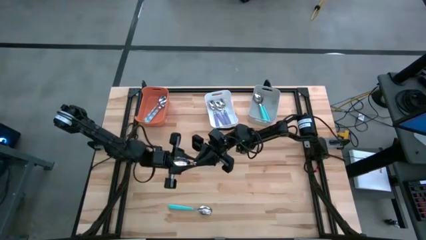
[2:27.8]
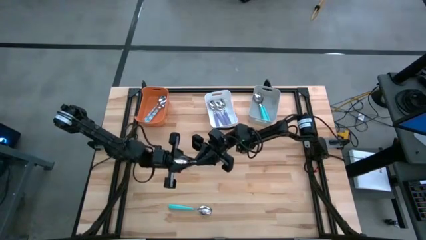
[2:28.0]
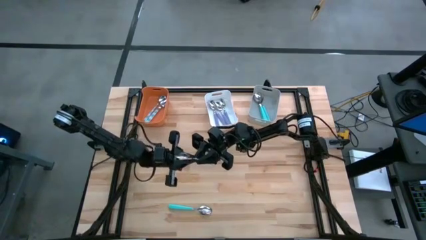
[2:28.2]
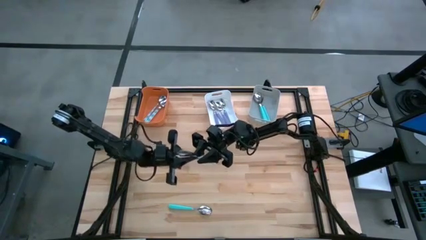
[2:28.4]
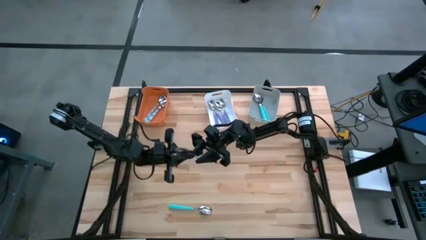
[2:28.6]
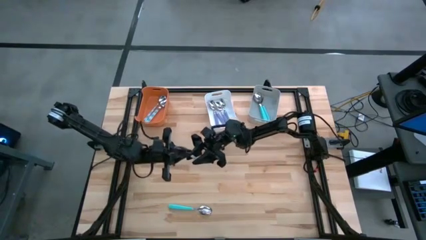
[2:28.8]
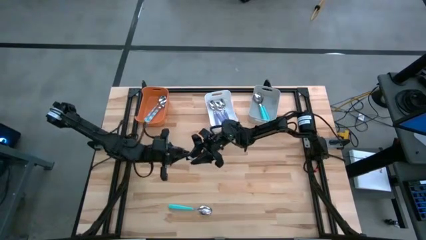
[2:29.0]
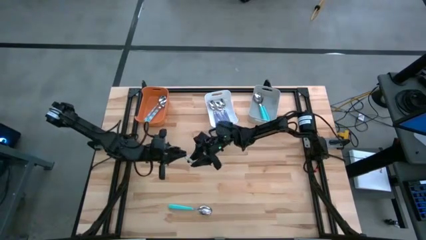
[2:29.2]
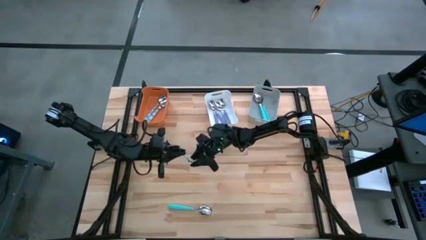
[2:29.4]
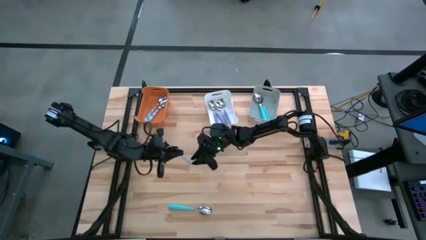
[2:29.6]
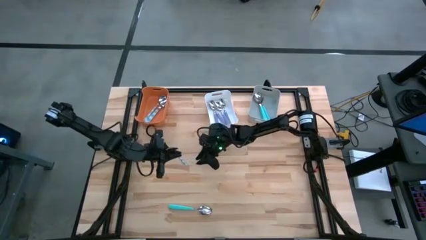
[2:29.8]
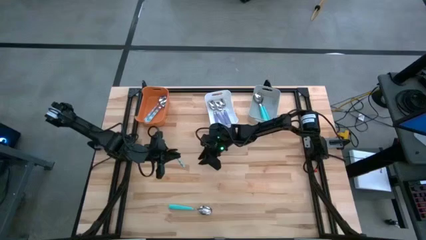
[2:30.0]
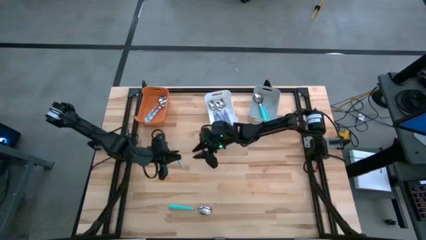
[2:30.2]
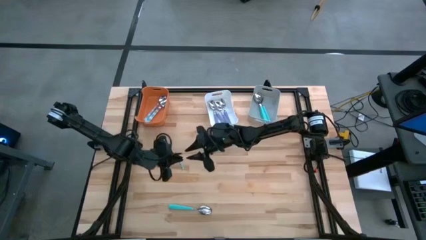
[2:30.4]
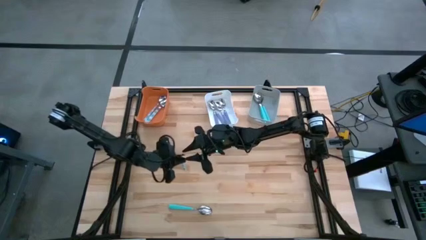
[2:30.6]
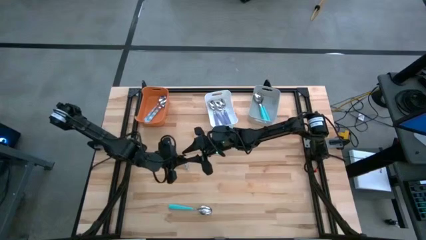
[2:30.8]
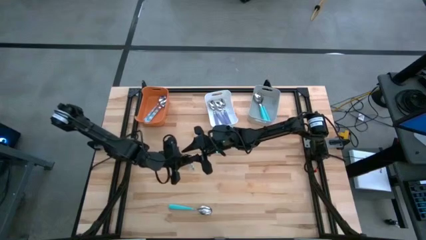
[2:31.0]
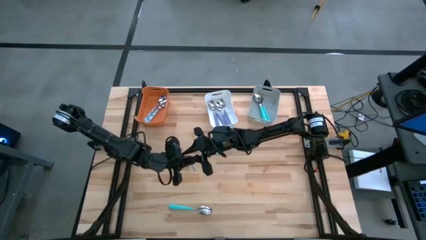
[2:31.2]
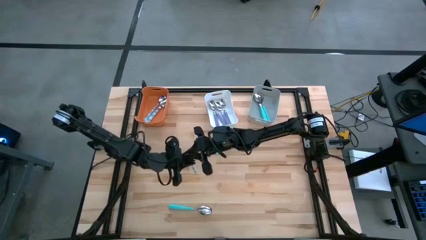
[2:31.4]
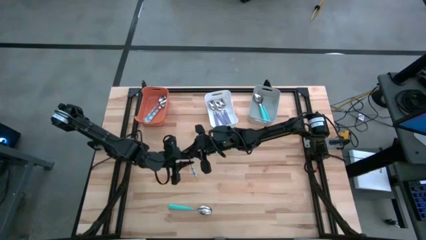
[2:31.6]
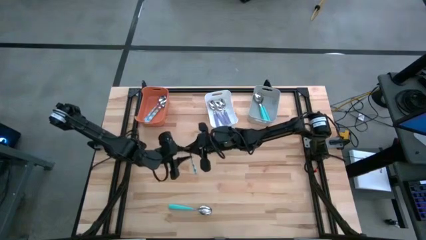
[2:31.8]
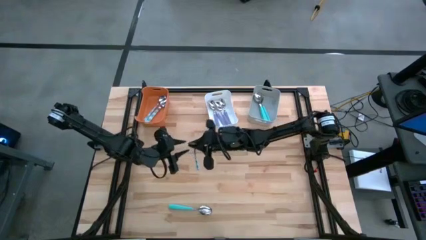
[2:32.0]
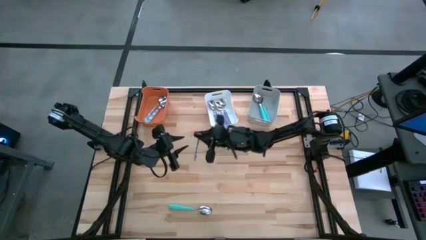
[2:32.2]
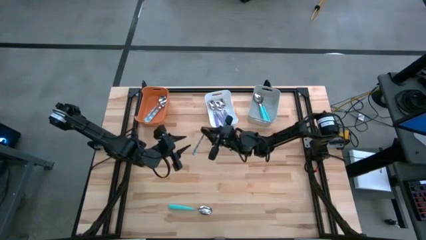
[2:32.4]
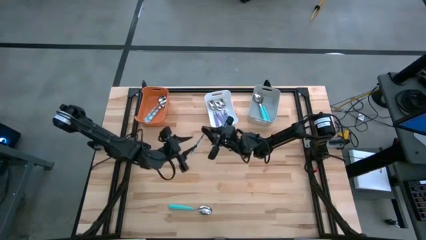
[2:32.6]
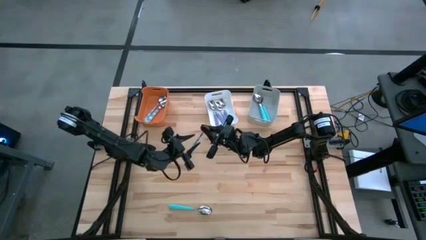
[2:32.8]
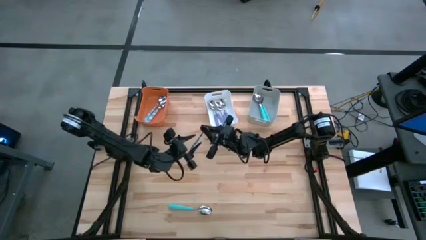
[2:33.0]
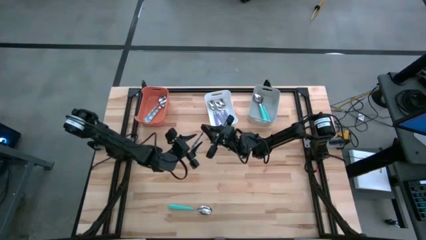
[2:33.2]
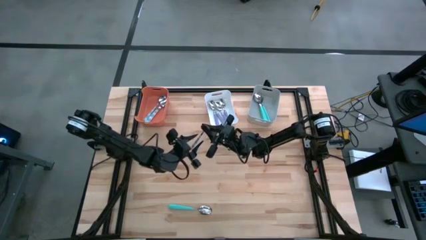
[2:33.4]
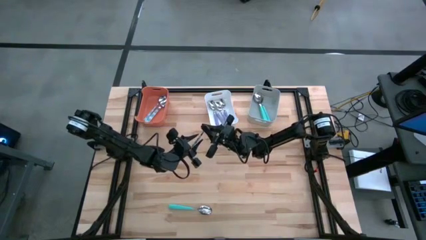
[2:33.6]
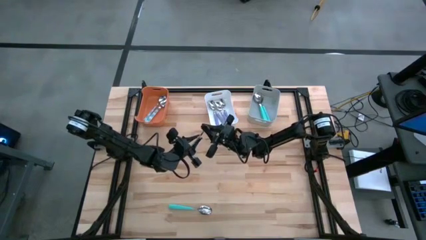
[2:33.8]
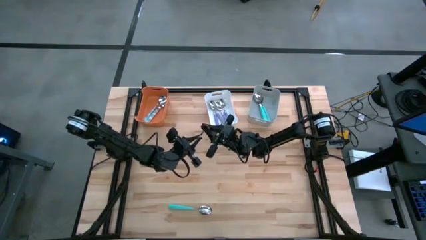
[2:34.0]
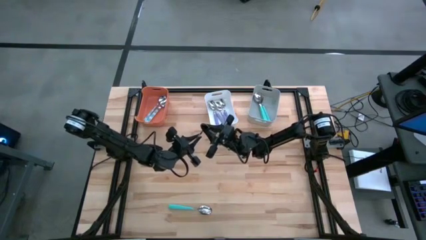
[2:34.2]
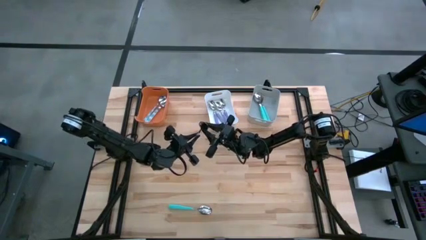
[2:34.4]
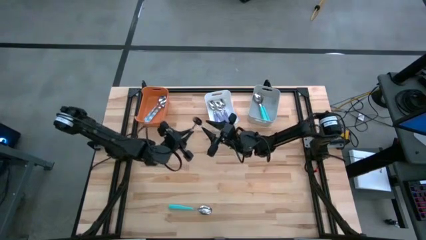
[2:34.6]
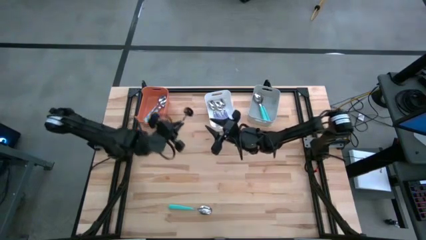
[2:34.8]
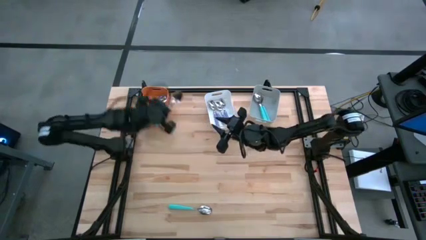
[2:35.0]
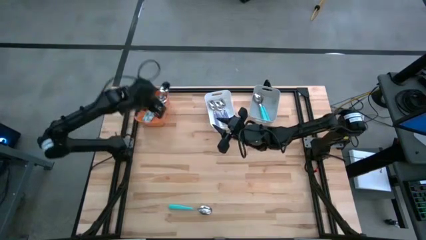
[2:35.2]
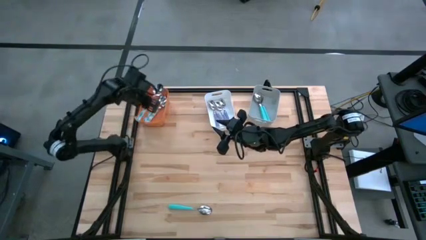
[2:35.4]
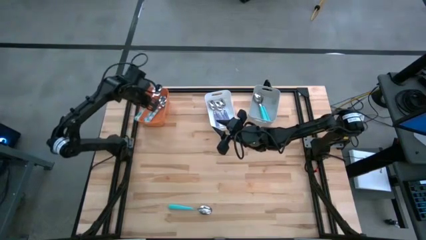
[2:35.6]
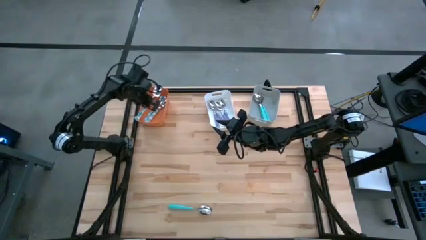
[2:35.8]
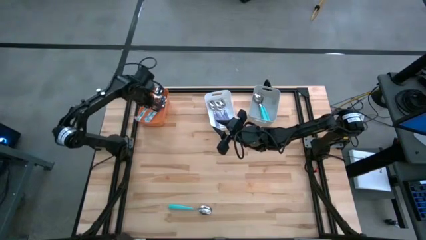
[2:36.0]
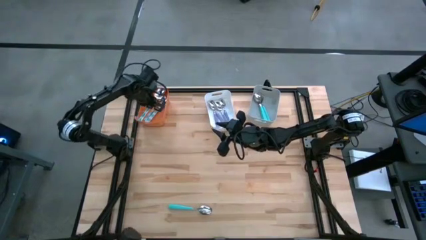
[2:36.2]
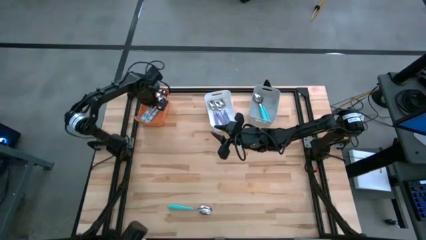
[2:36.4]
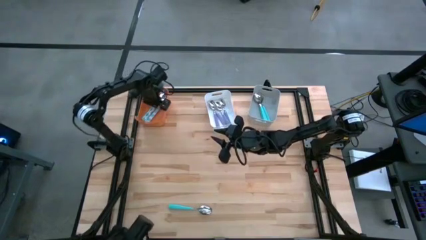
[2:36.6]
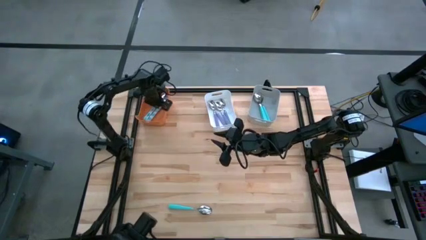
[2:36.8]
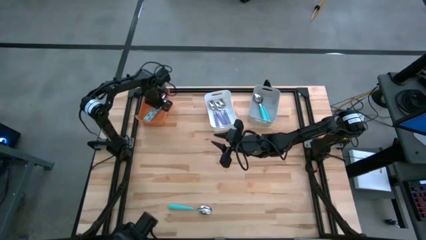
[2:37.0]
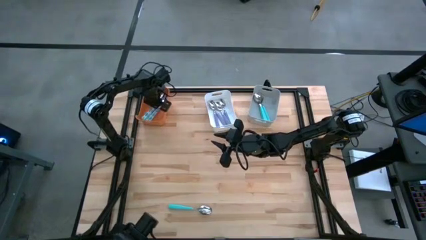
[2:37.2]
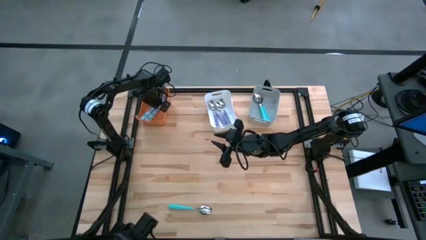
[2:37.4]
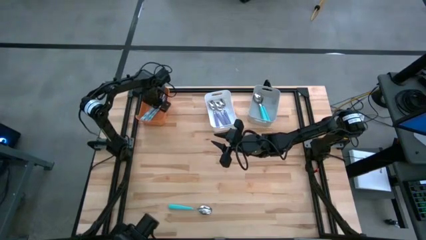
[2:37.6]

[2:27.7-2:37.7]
Task: Sort silverware by color (type)
Put the blue patterned spoon into the orange bin
